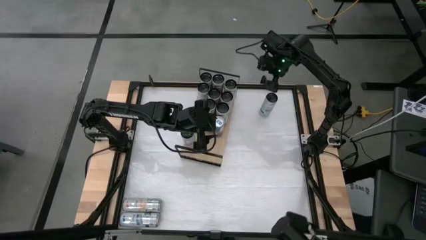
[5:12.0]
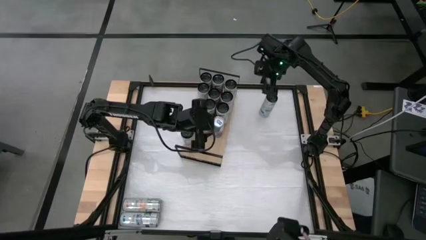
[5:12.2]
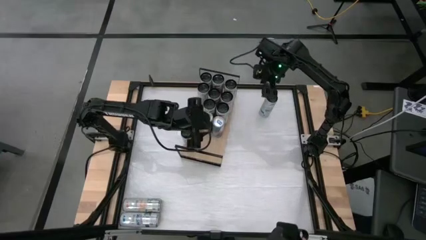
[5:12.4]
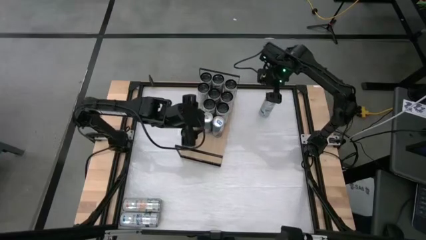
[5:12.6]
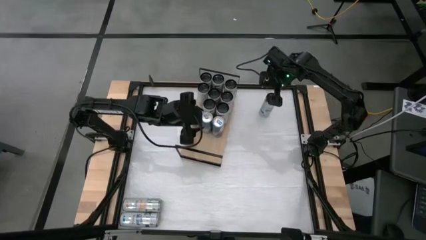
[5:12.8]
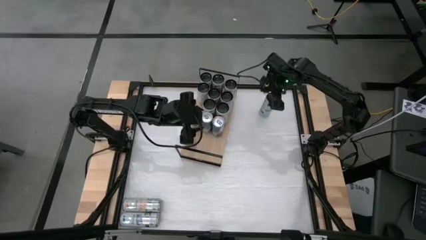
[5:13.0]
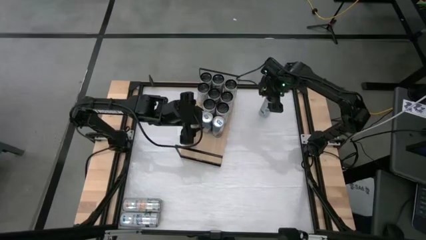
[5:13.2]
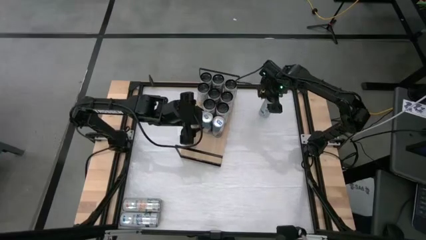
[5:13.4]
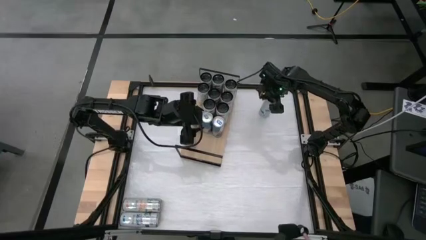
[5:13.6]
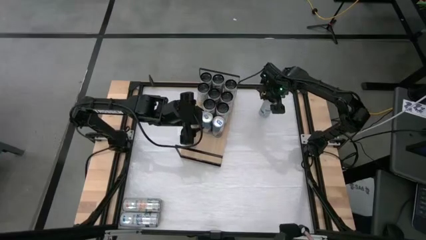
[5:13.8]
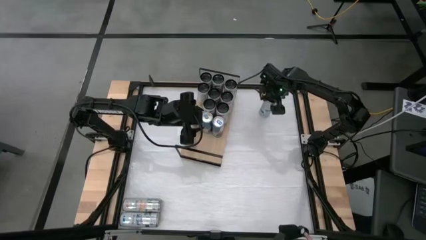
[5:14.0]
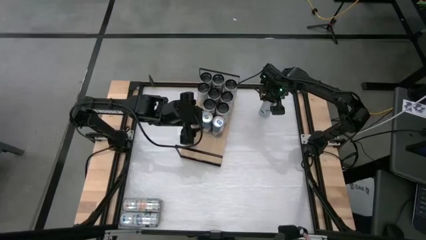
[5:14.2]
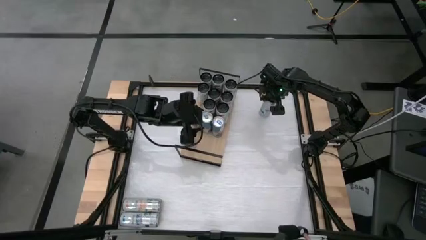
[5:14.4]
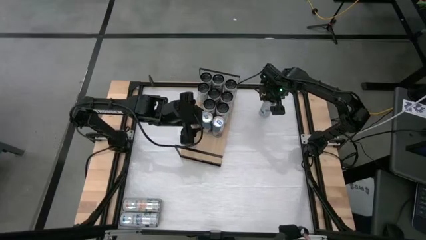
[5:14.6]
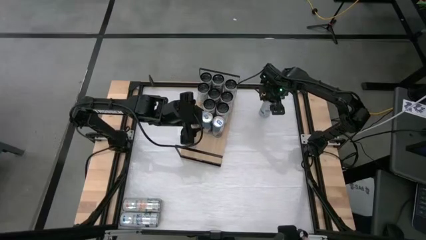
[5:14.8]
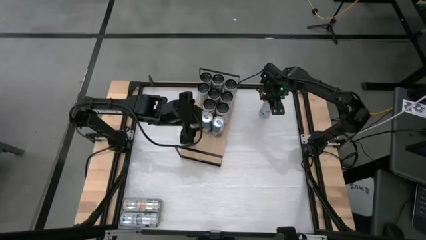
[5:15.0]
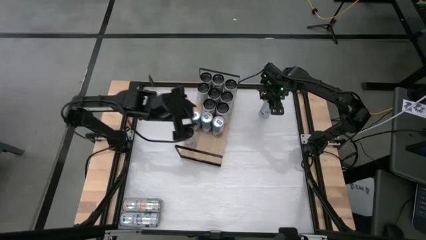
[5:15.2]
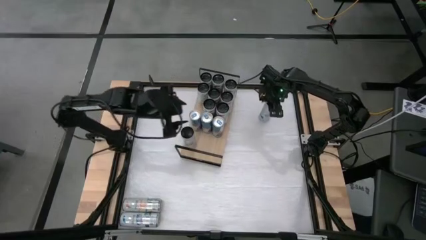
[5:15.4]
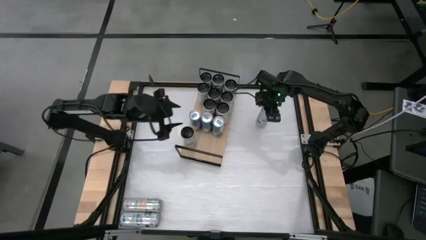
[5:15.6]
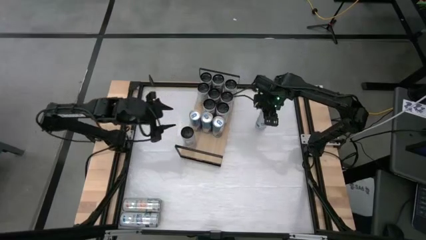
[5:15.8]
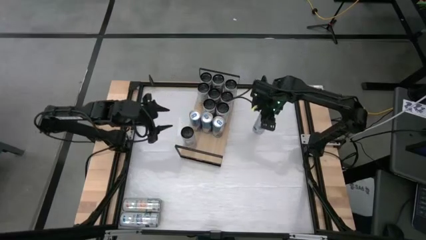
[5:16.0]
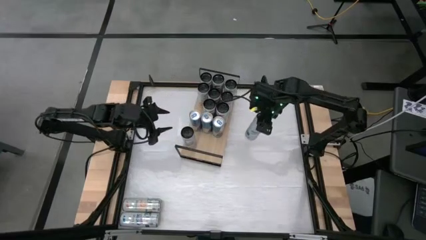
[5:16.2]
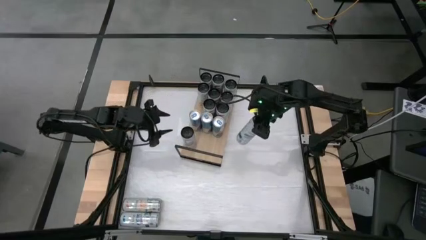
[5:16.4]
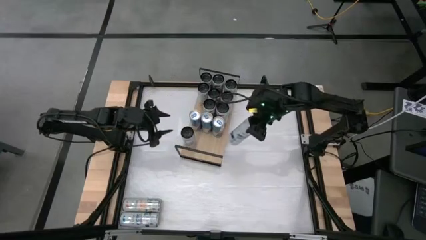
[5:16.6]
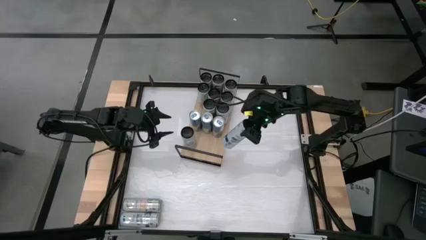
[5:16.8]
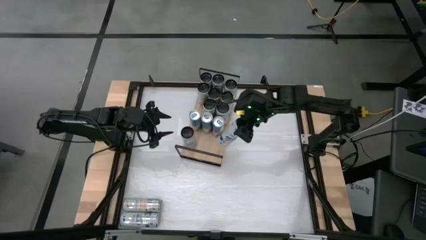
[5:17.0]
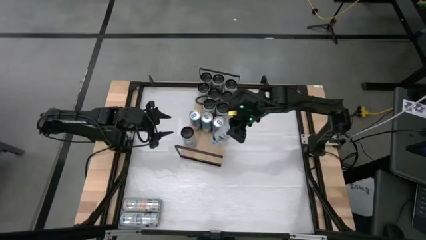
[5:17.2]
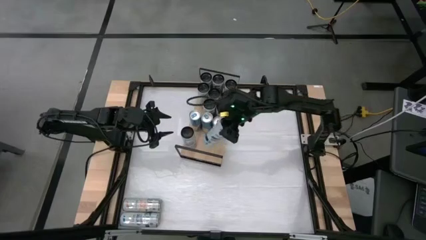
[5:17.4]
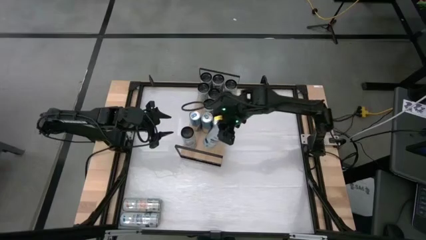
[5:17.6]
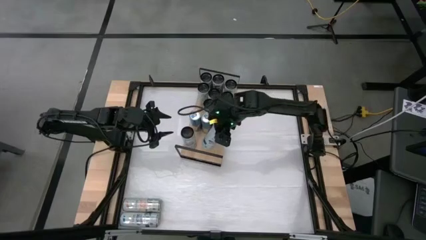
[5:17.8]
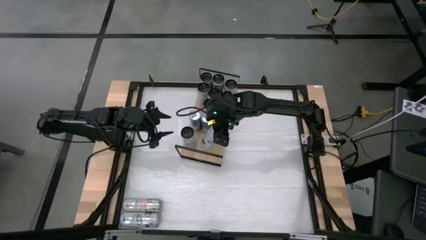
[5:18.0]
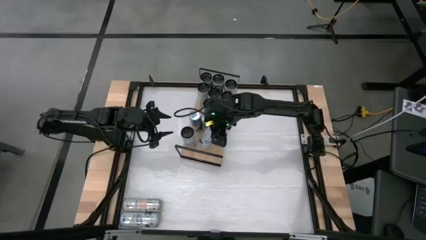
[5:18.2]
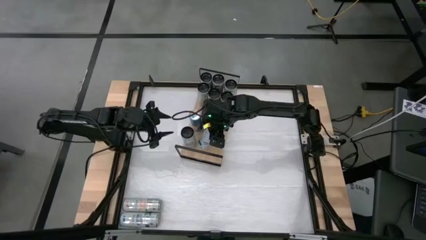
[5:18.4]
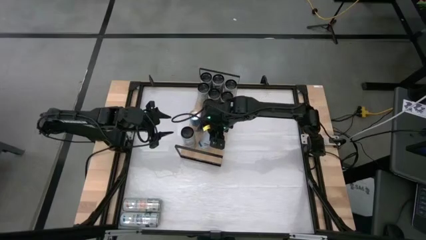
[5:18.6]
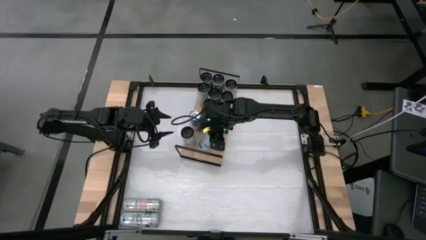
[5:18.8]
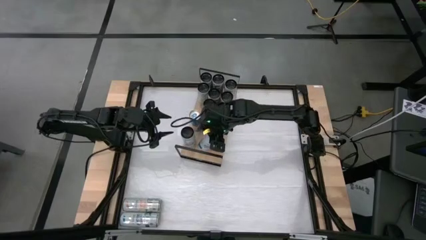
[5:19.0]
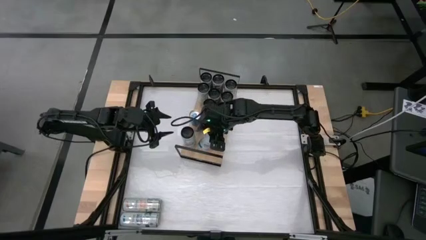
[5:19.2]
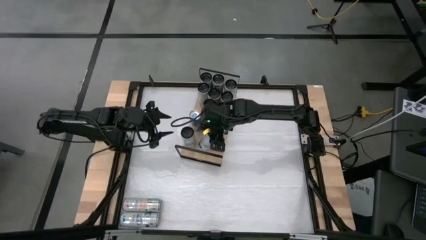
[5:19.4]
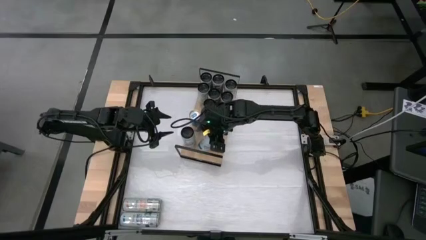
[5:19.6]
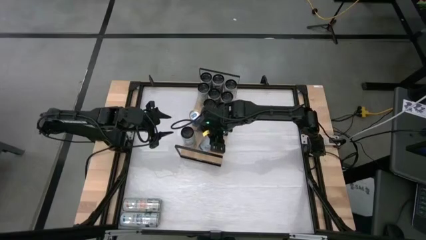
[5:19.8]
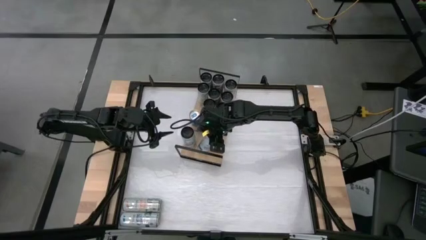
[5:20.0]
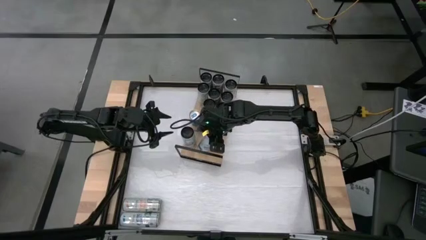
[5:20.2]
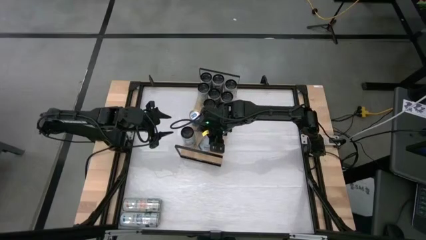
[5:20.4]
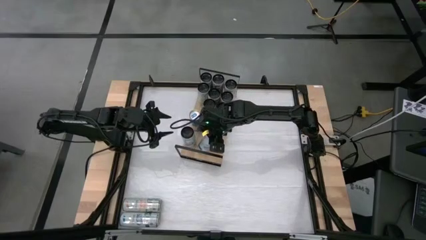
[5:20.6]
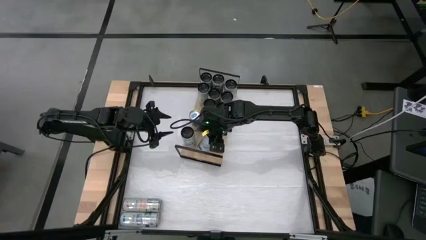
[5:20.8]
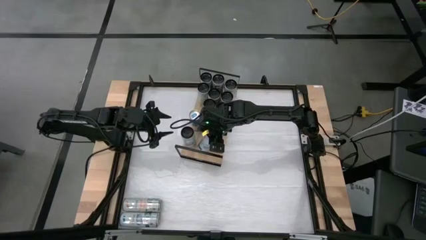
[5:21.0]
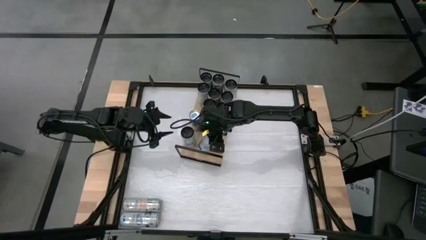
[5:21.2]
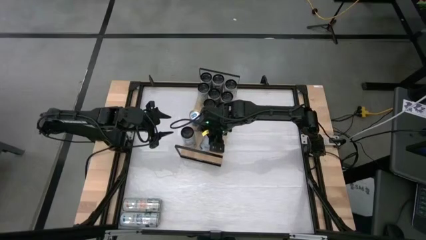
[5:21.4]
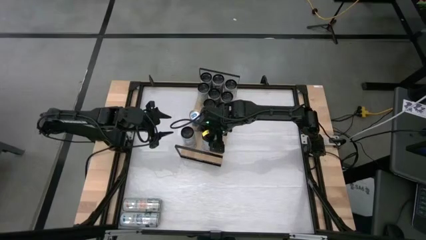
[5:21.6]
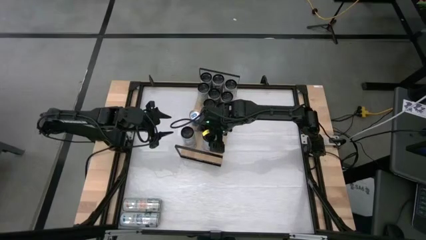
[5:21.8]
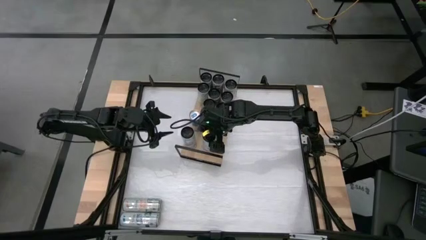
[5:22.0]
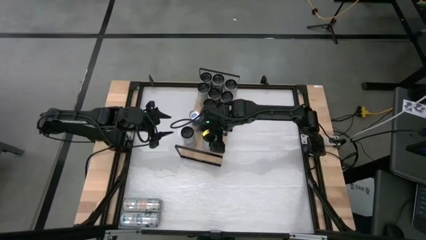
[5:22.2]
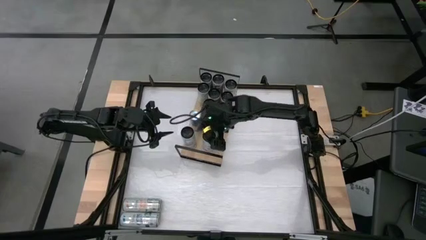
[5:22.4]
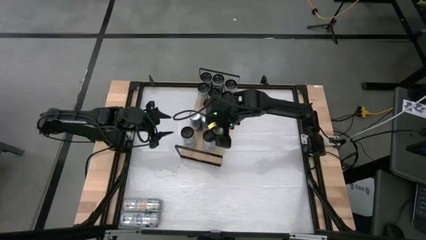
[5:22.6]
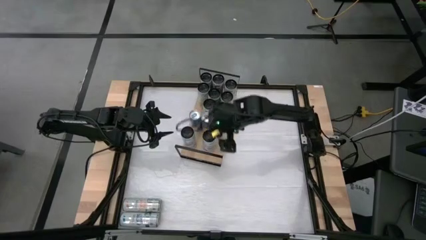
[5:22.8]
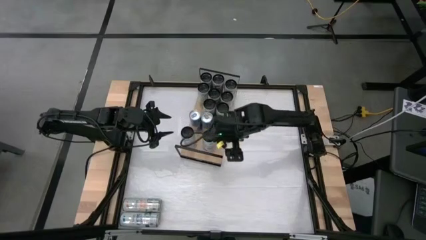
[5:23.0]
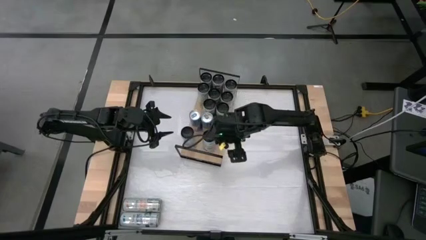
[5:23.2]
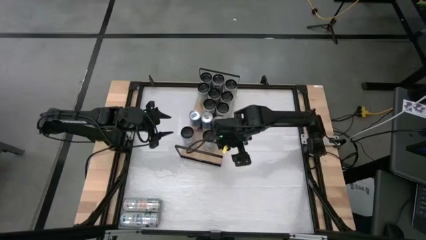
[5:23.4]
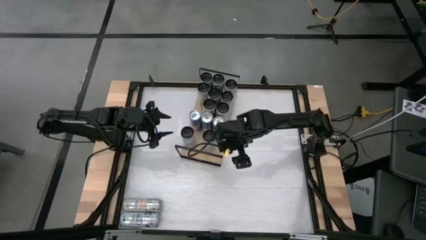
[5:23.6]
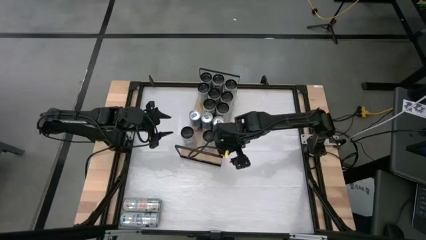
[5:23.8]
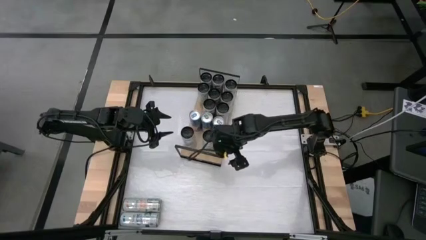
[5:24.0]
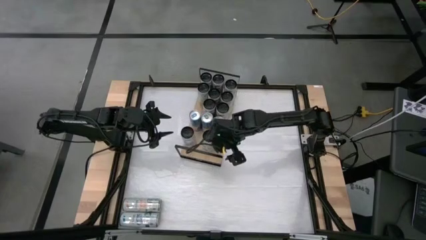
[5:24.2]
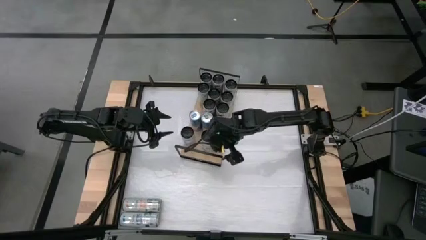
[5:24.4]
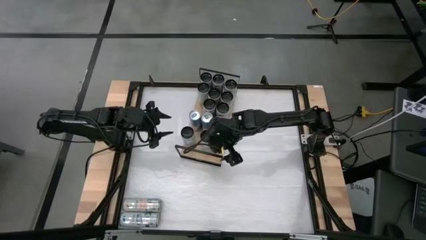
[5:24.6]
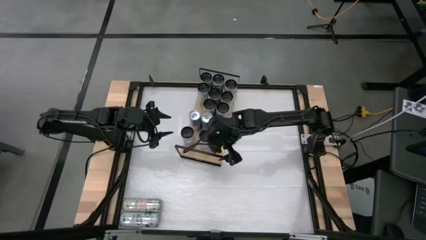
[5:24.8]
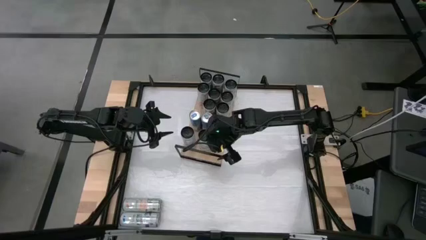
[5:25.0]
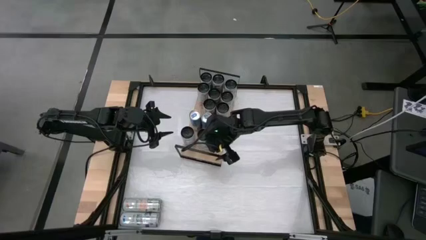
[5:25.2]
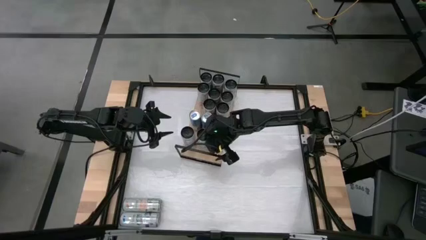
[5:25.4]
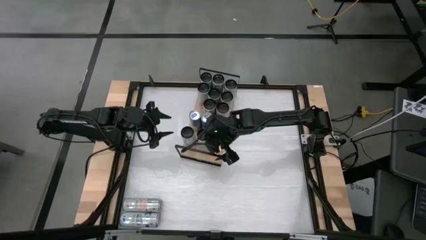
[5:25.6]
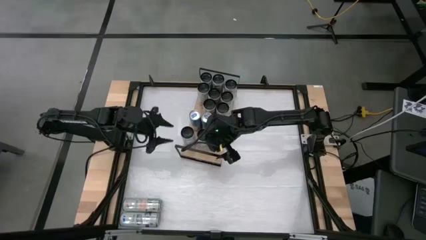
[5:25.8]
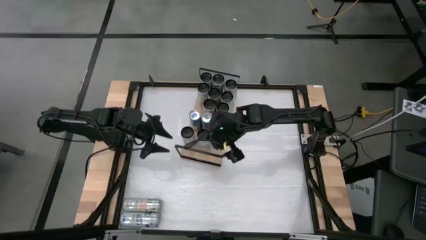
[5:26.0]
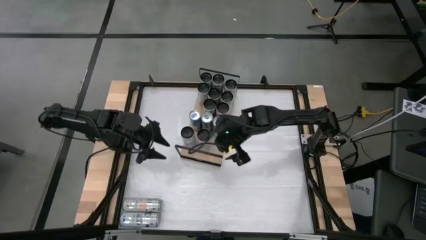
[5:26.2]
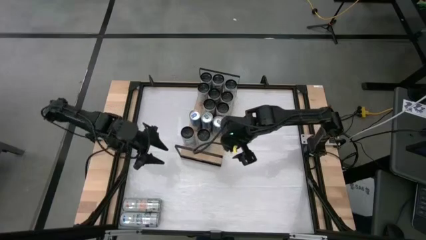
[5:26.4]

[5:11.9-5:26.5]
Task: Place canned beverage on shelf
Put the top right blue soda can on the shelf aligned with the other blue soda can

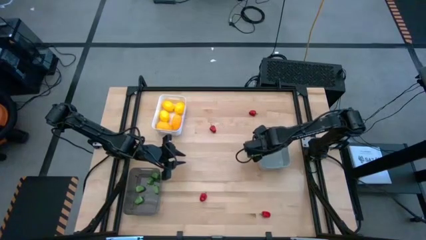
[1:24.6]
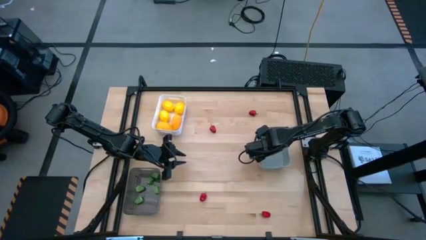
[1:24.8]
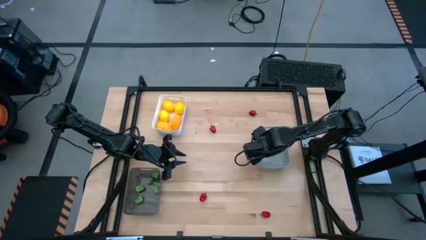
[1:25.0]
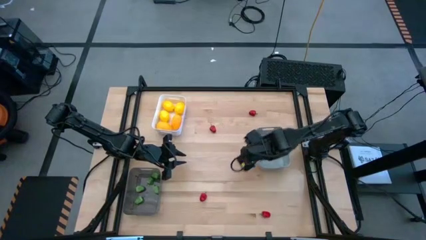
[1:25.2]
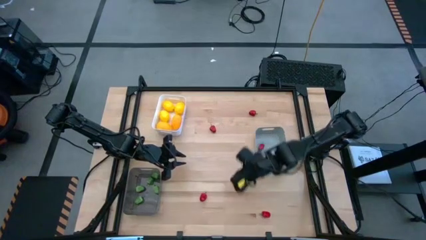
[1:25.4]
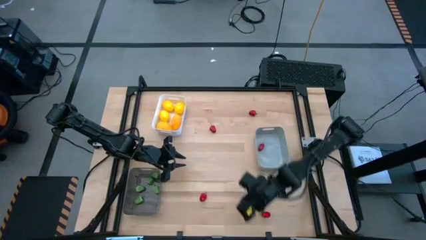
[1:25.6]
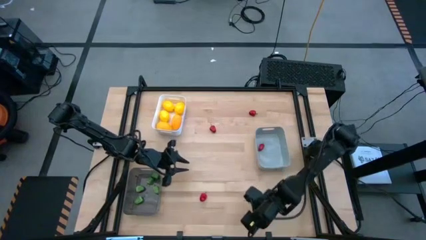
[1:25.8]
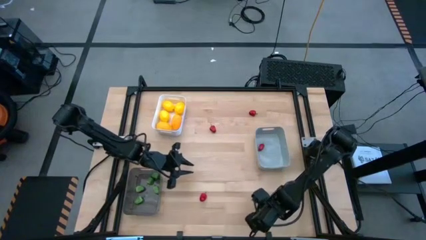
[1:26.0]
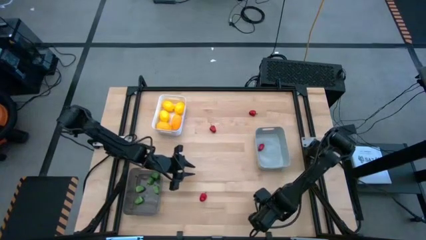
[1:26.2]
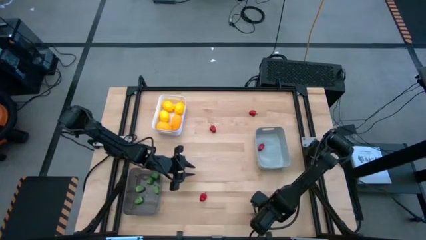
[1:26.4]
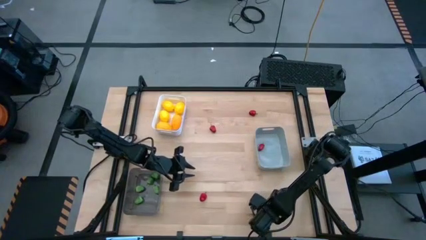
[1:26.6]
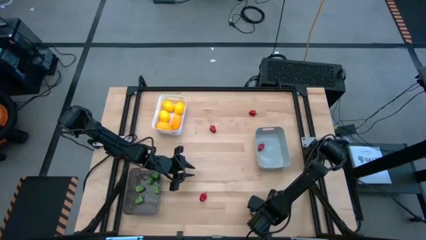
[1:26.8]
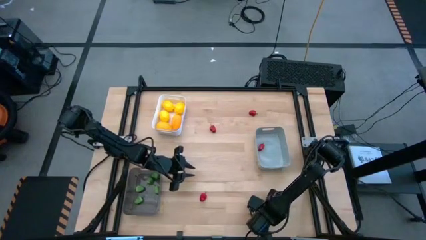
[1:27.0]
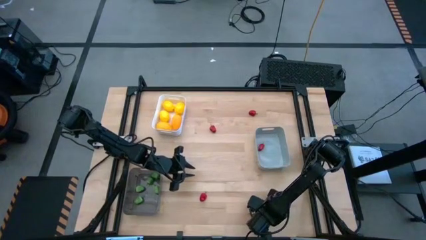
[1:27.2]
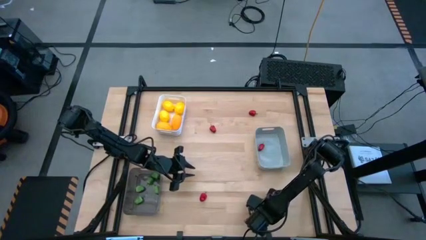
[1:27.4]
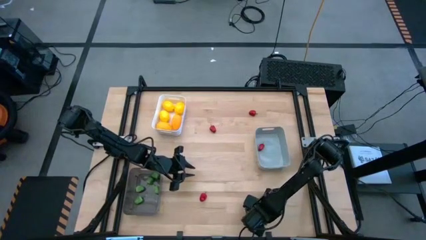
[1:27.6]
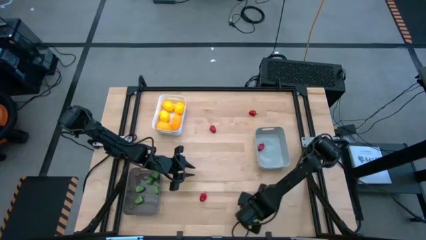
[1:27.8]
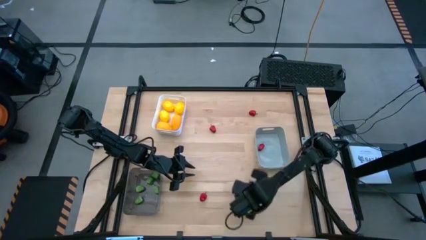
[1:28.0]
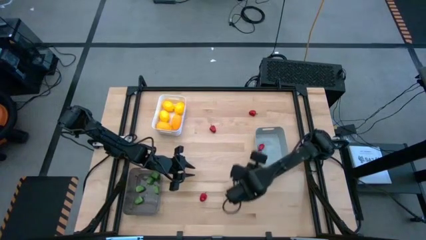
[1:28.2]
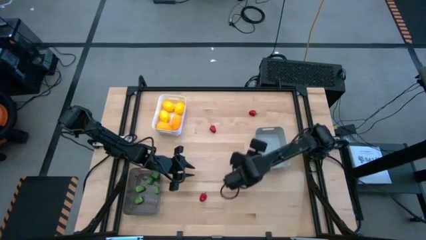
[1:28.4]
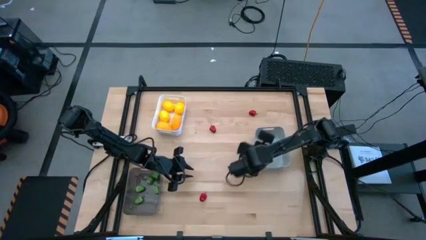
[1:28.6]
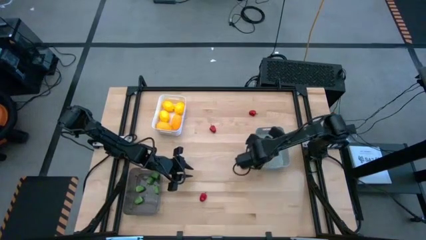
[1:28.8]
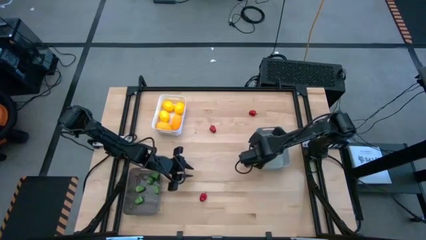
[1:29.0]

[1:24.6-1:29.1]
Task: Sort produce into baskets
Put the bottom right red chili pepper into the gray bin
